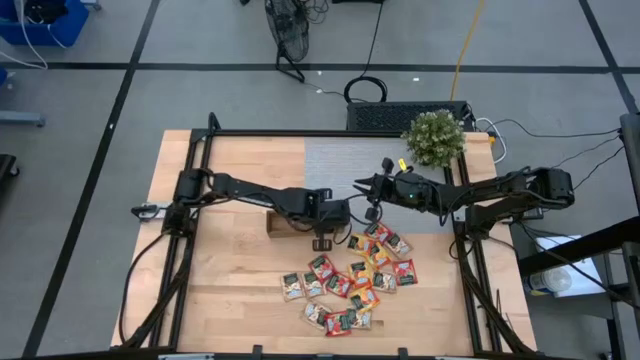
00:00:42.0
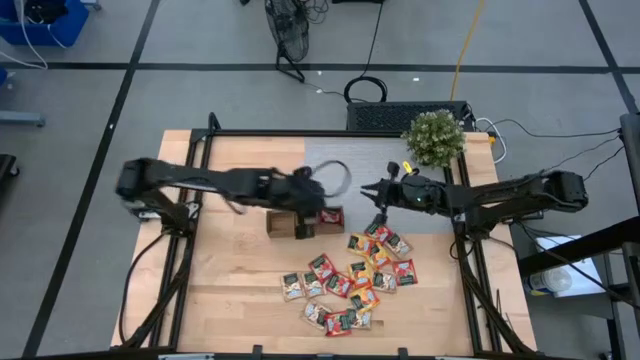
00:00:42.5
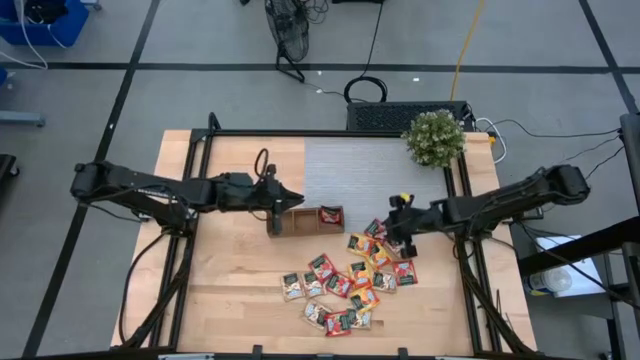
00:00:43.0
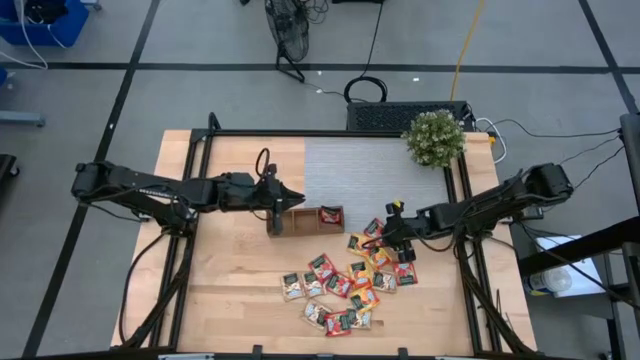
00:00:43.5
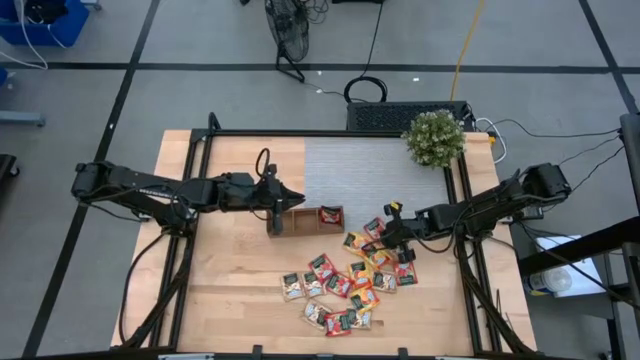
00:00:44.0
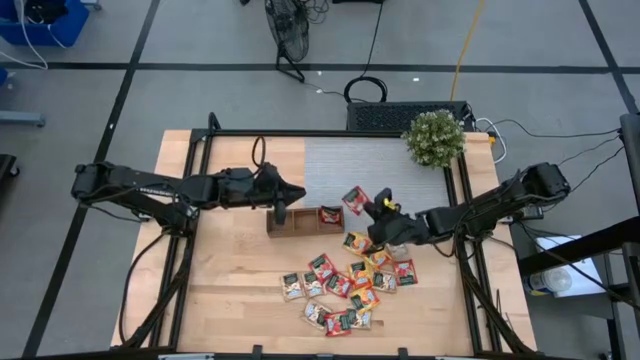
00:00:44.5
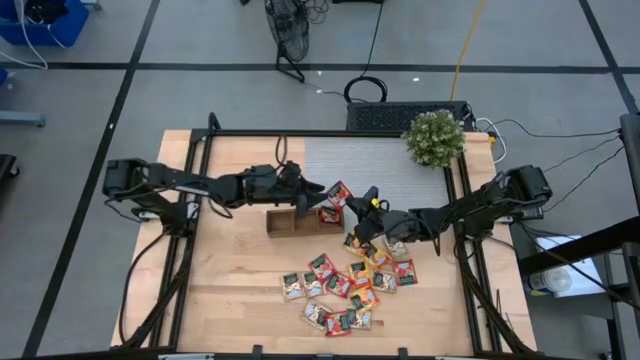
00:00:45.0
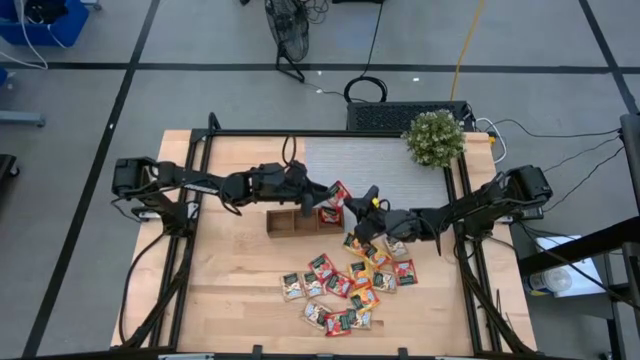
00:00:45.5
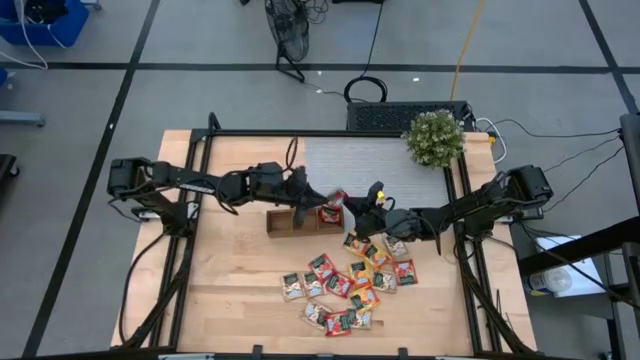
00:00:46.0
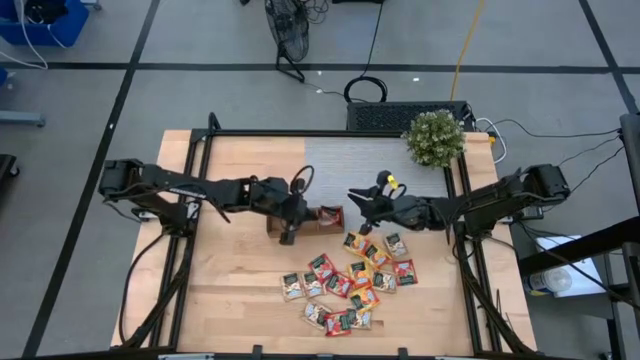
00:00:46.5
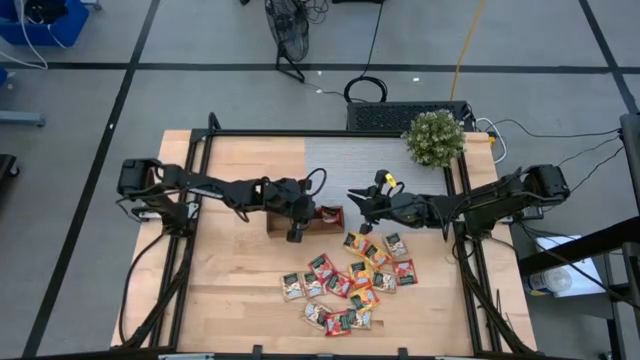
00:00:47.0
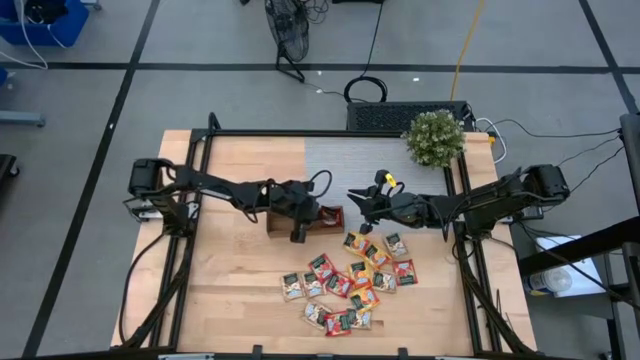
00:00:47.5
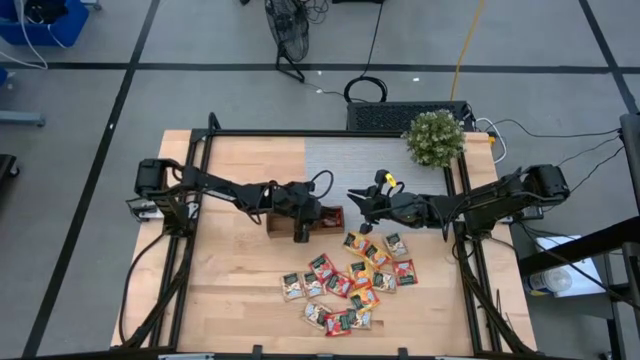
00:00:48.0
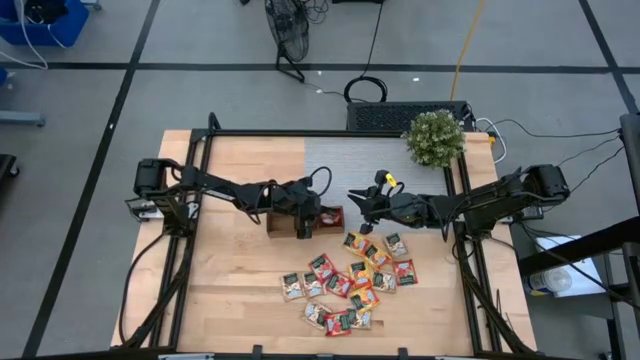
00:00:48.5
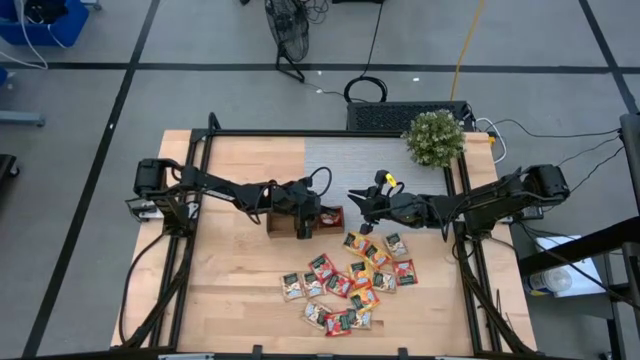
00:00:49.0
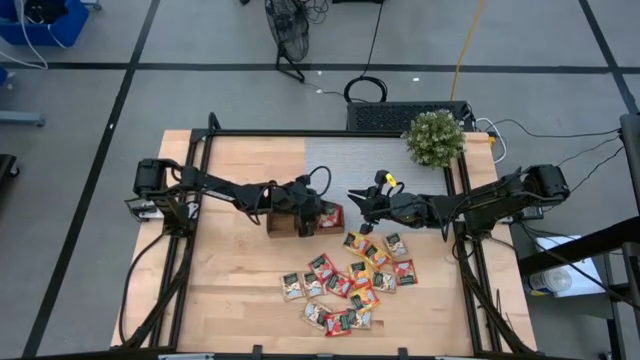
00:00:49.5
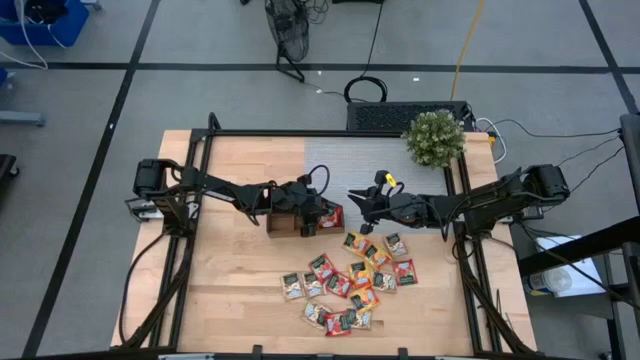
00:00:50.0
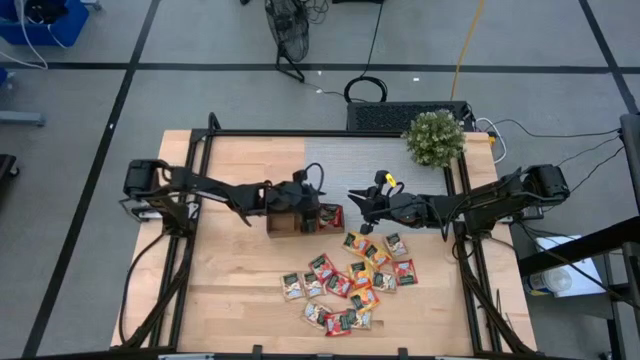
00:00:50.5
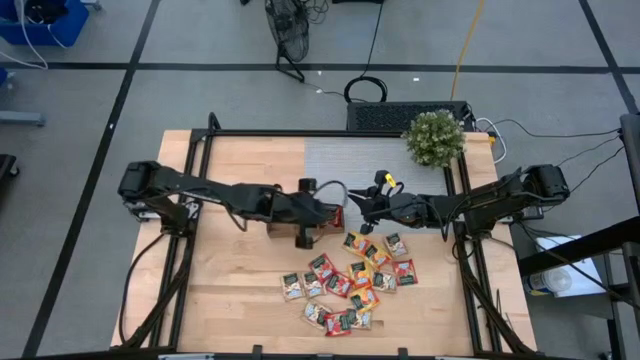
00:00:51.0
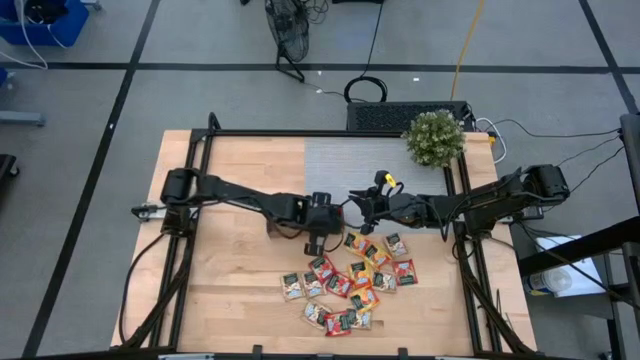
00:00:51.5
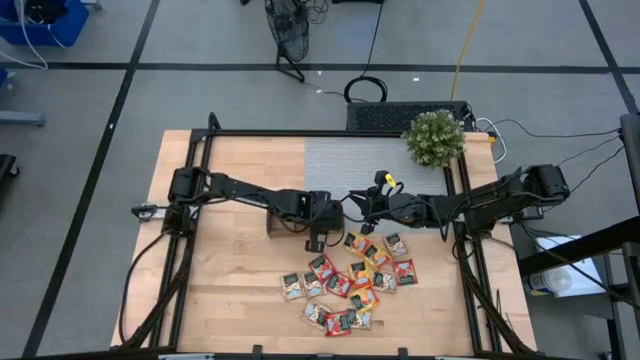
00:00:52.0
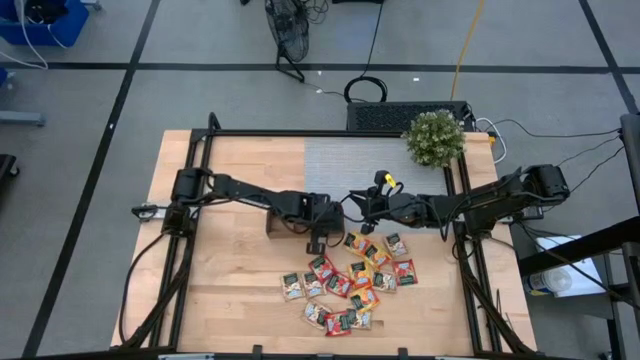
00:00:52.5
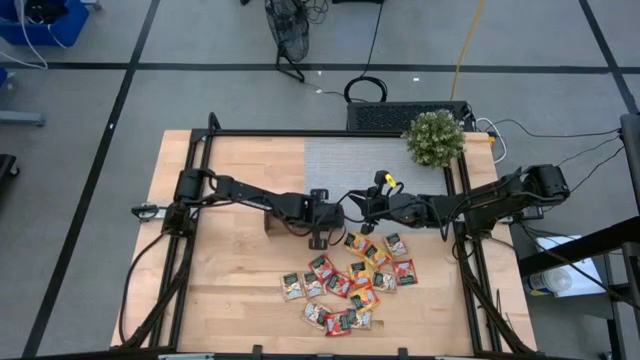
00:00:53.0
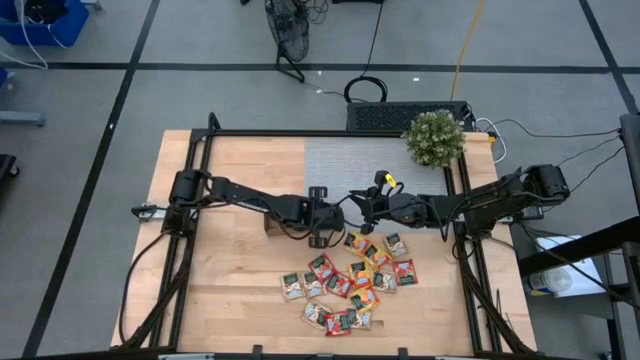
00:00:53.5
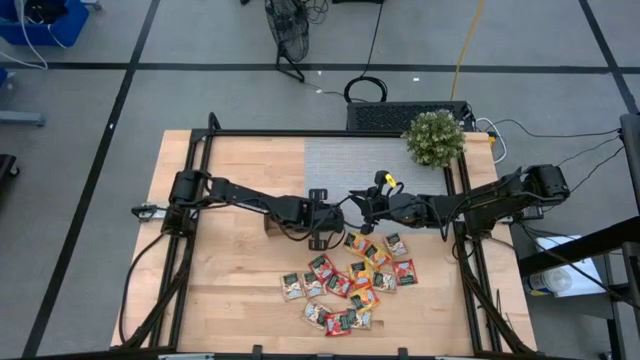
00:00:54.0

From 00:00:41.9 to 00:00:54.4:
Task: Pick & Place Tea
Put the red tea bag into the right section of the wooden organizer

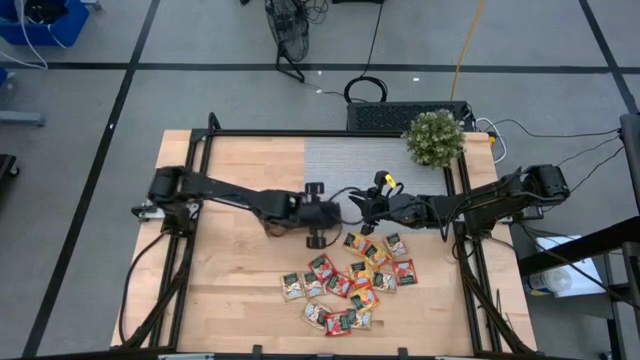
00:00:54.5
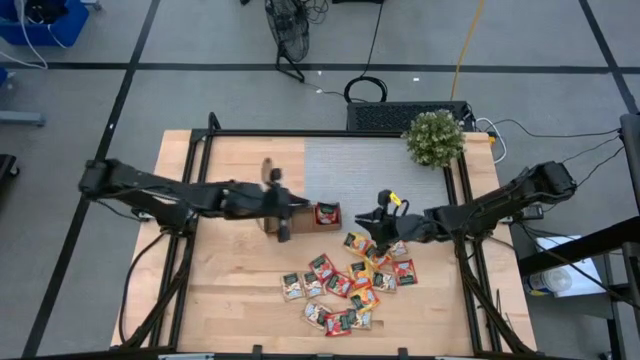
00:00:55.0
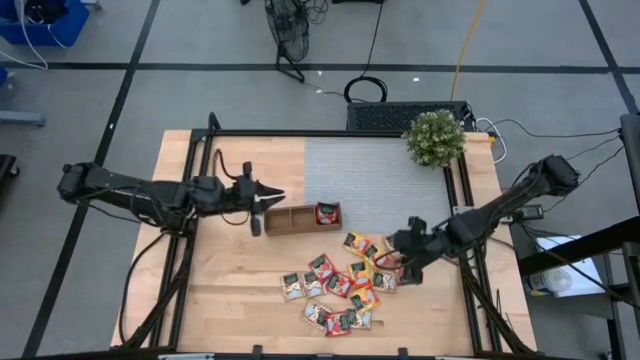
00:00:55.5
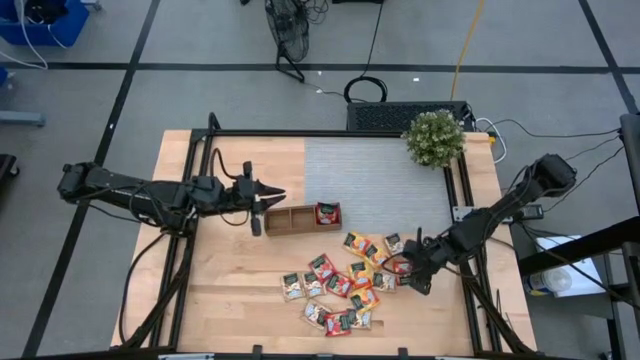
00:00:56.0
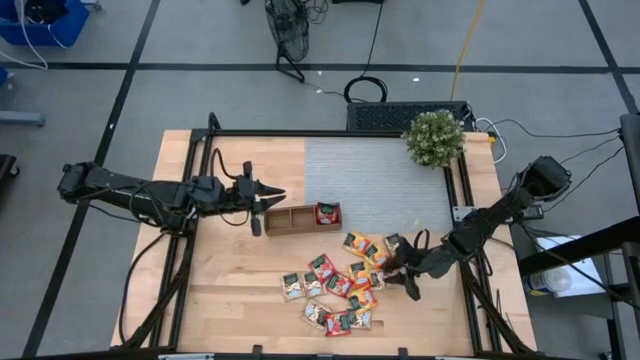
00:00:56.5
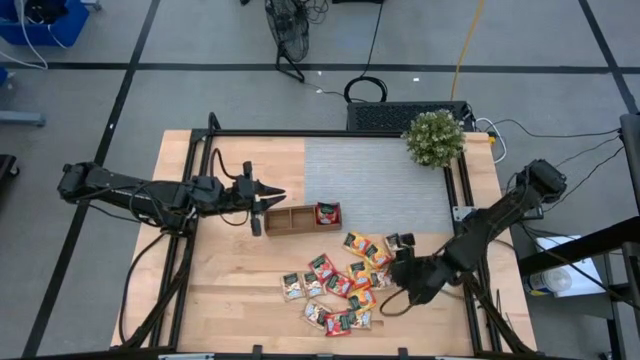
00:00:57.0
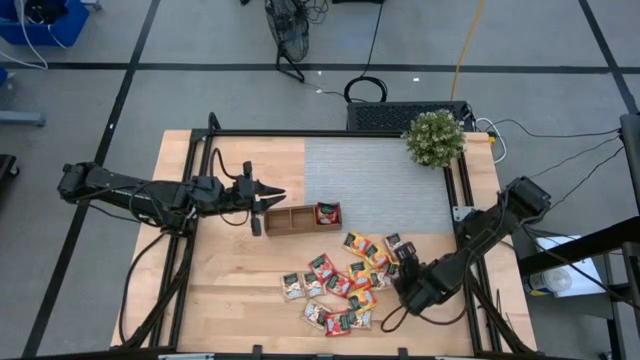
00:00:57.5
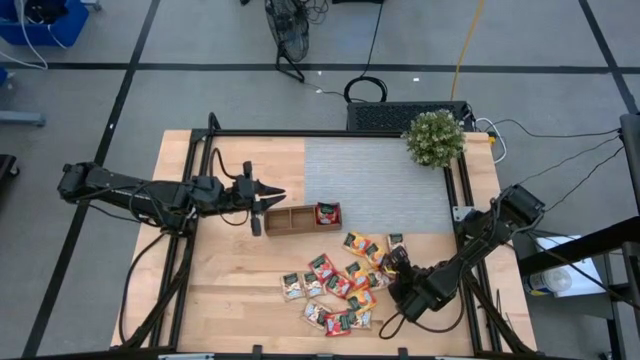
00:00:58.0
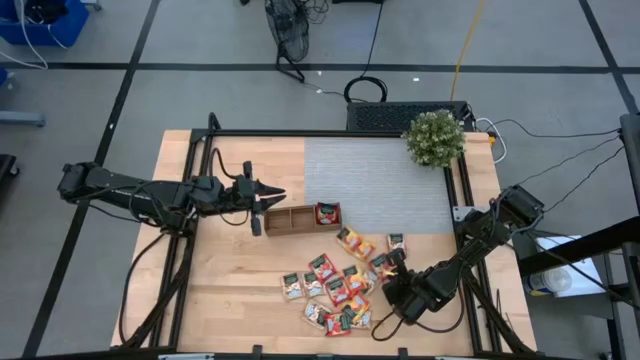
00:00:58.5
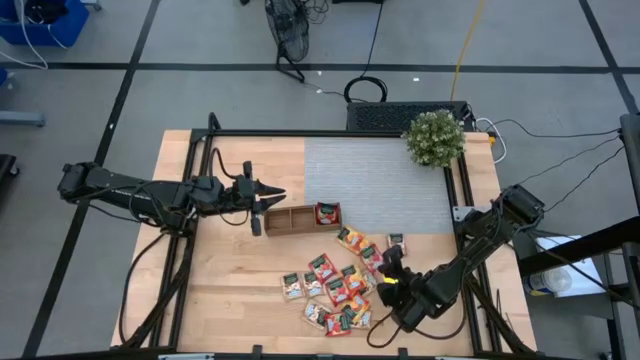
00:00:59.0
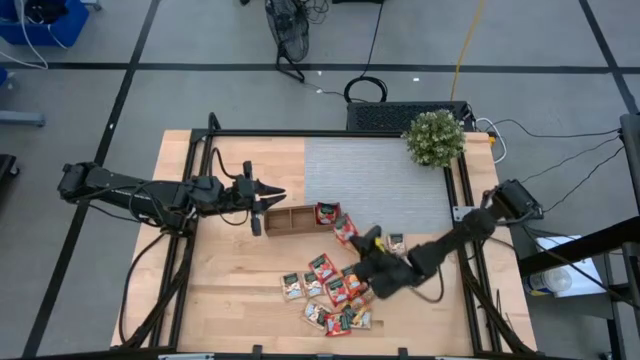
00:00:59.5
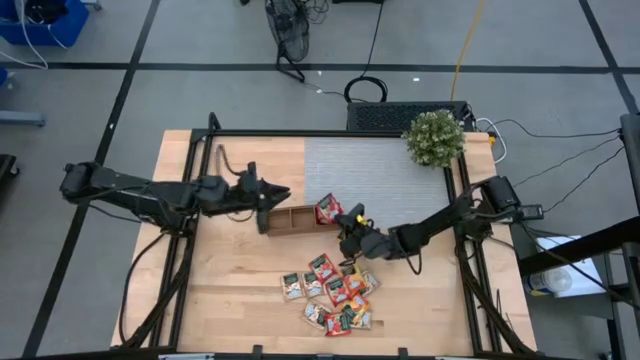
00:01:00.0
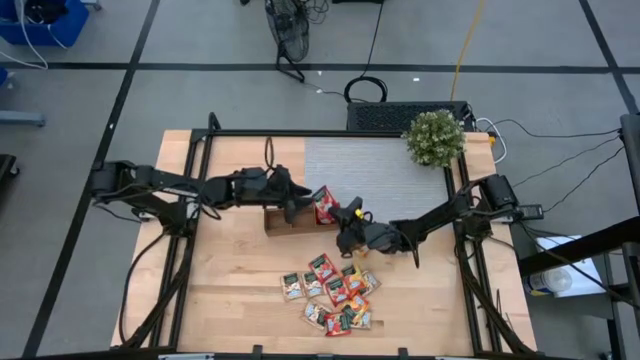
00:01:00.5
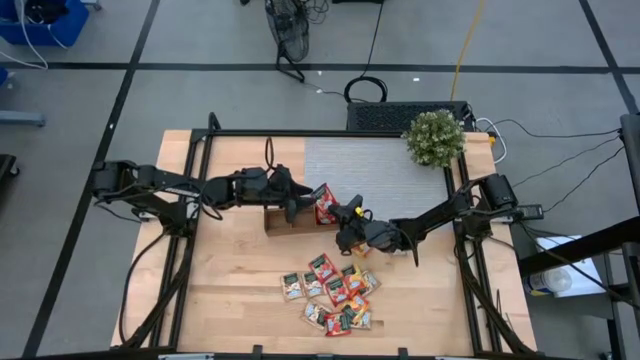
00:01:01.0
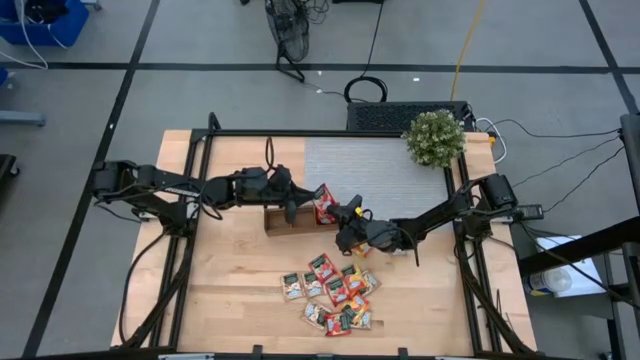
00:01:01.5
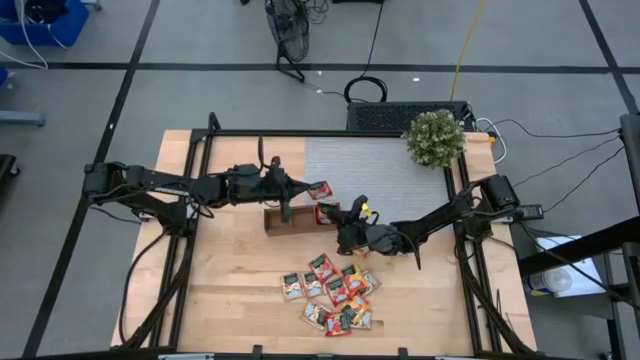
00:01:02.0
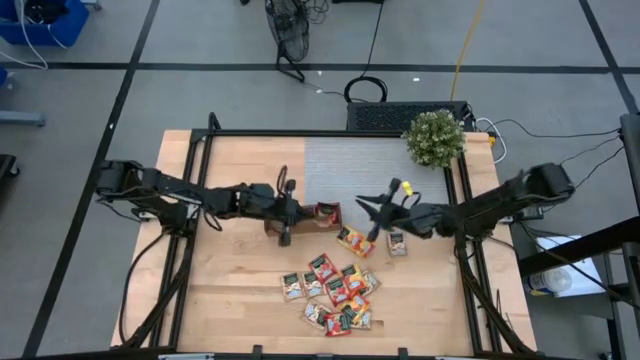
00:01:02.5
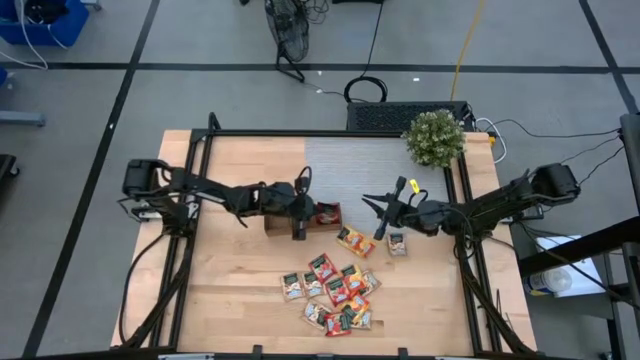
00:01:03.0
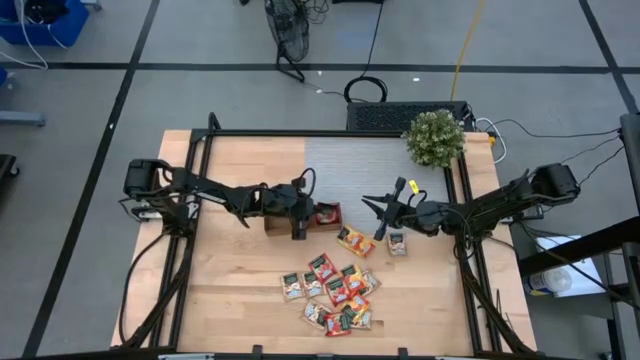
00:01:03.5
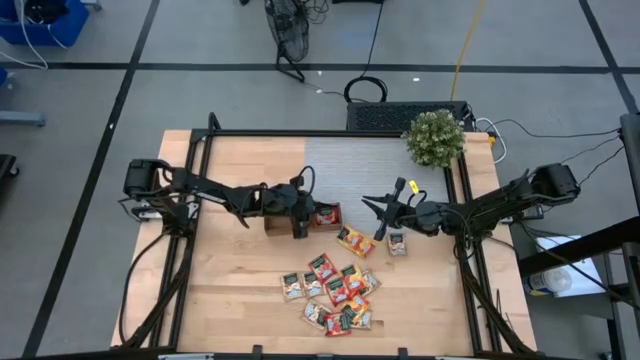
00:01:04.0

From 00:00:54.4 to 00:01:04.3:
Put the red tea bag into the right section of the wooden organizer
